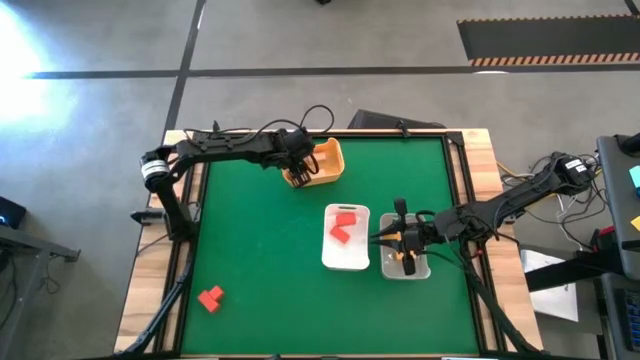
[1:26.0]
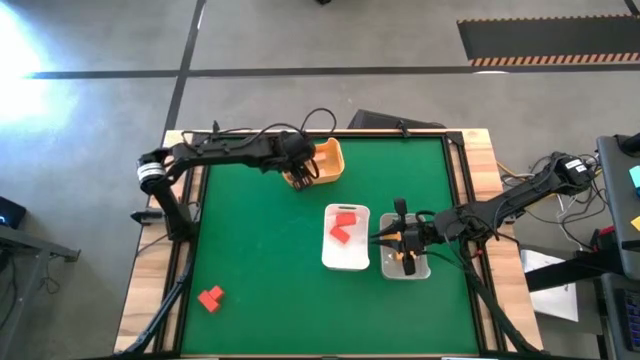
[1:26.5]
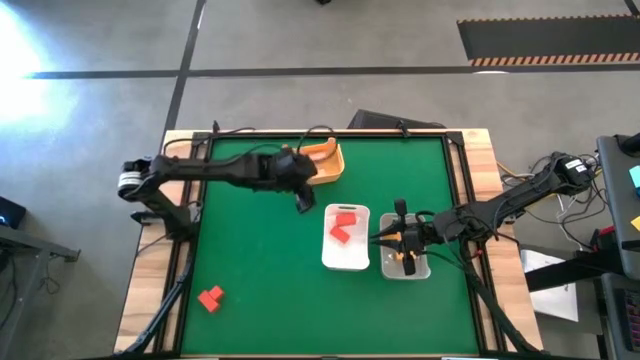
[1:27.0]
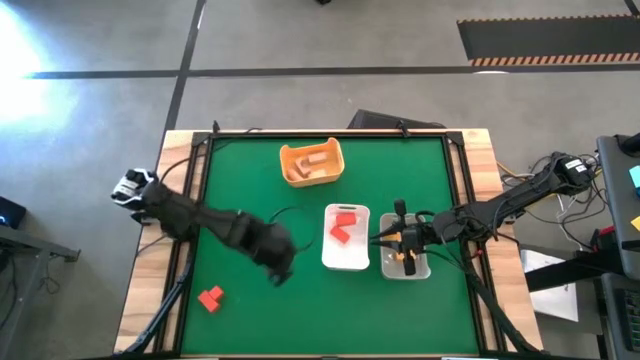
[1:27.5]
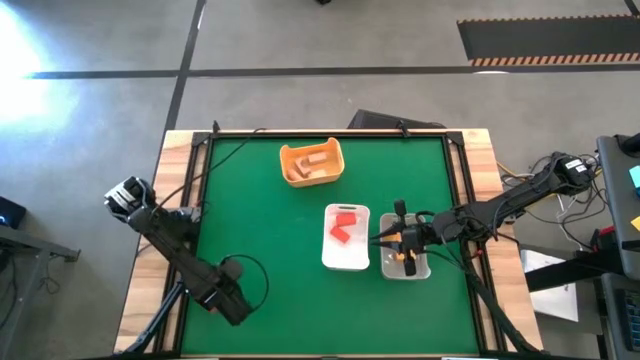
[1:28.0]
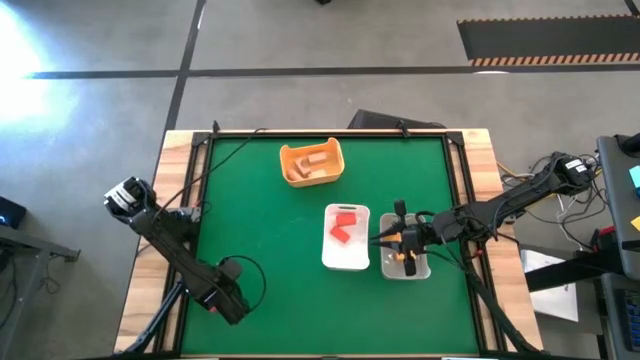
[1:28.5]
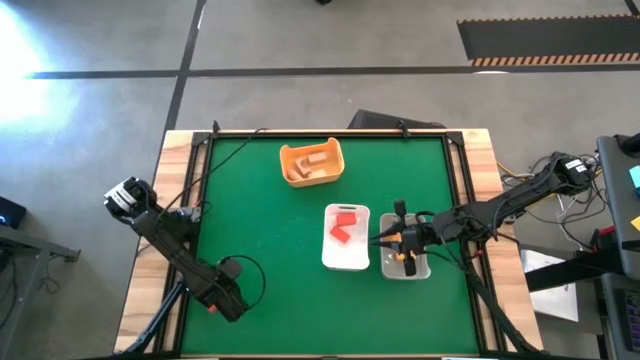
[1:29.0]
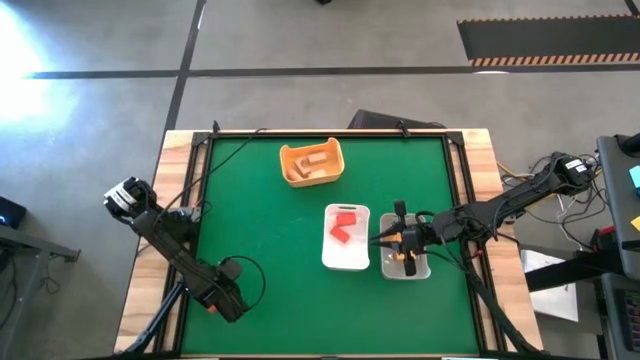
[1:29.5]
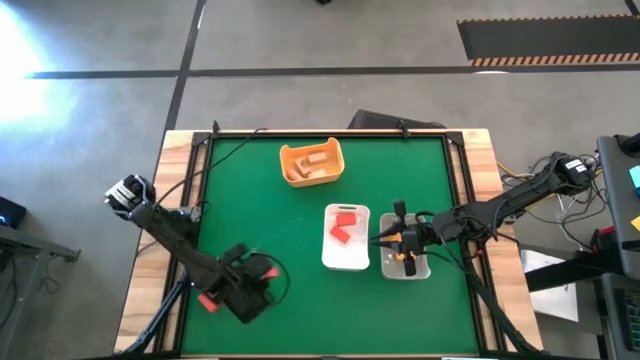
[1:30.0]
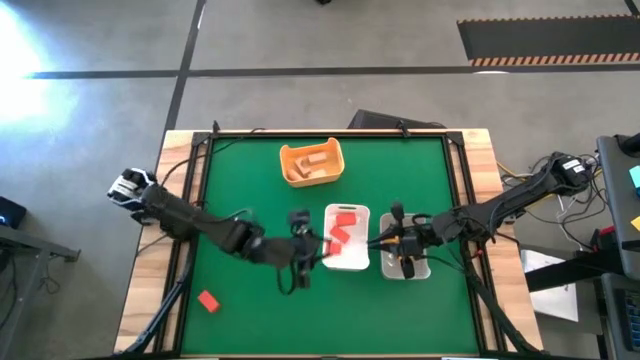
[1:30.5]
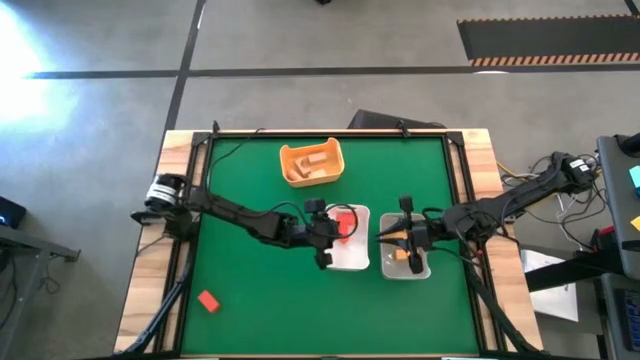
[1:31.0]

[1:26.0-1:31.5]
Task: Sort & place blocks by color
Put the red block into the white bin

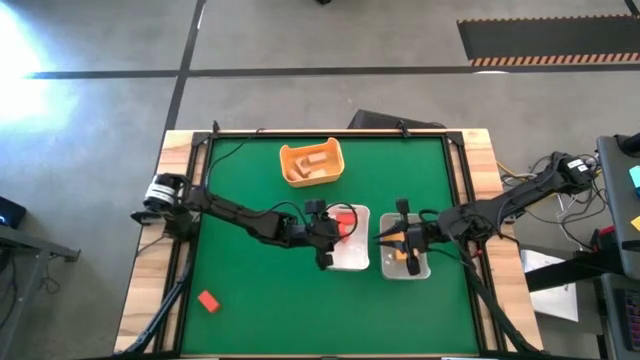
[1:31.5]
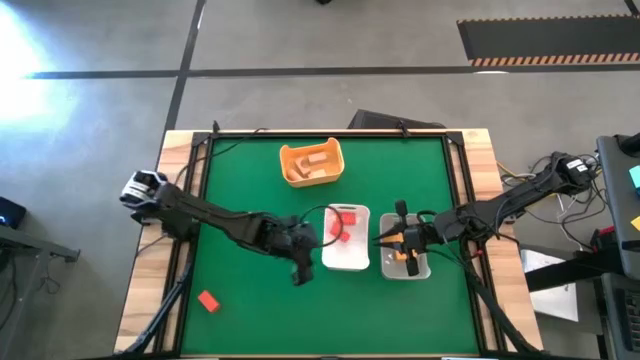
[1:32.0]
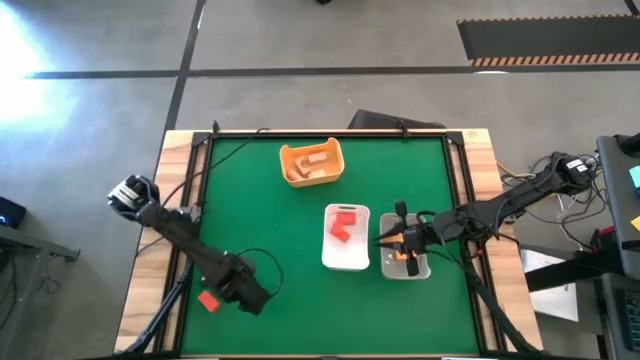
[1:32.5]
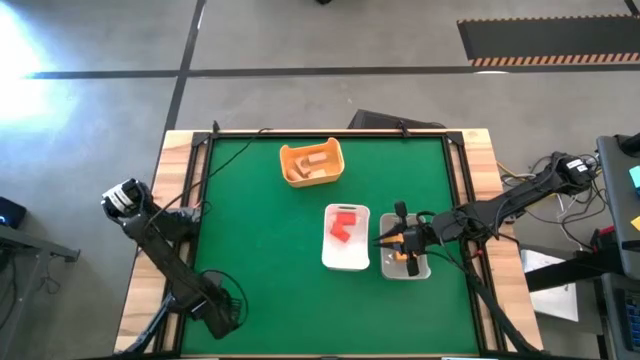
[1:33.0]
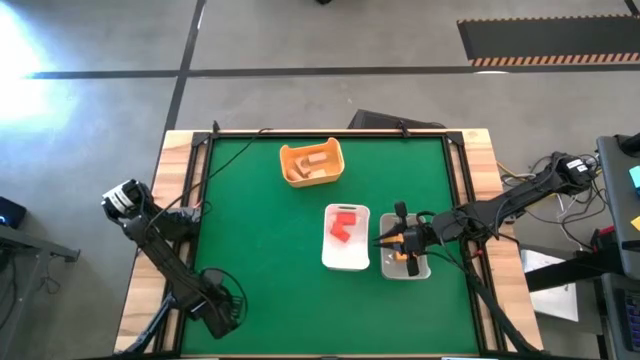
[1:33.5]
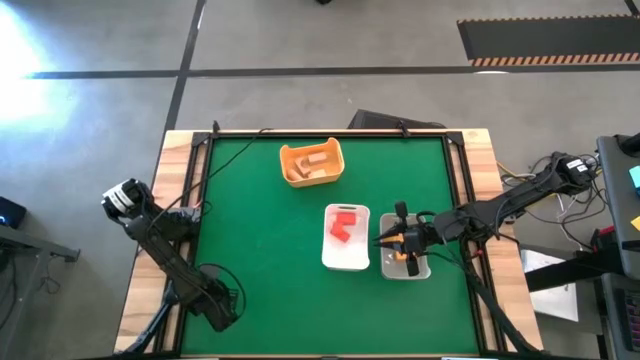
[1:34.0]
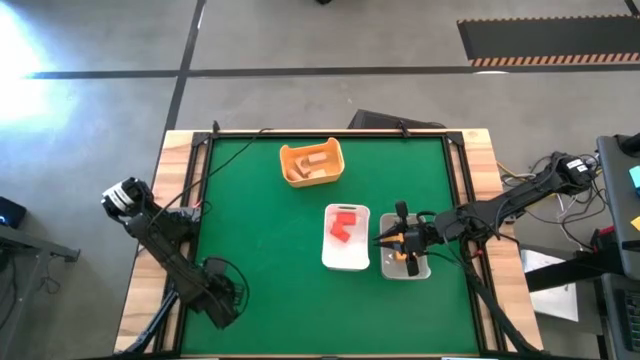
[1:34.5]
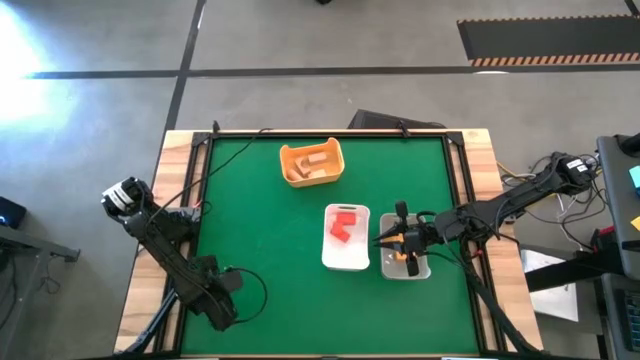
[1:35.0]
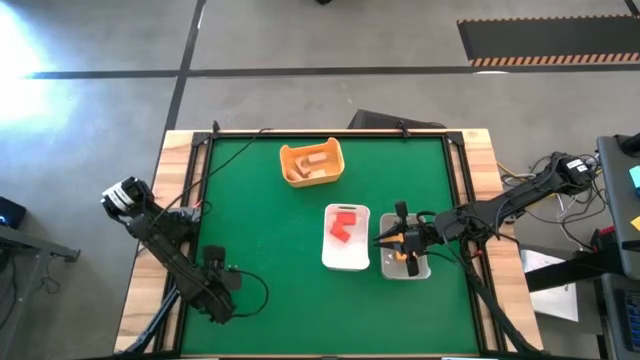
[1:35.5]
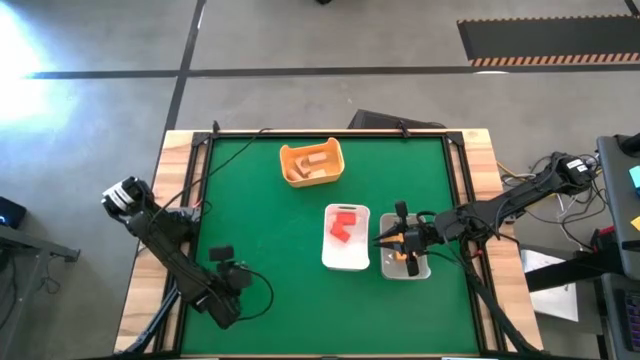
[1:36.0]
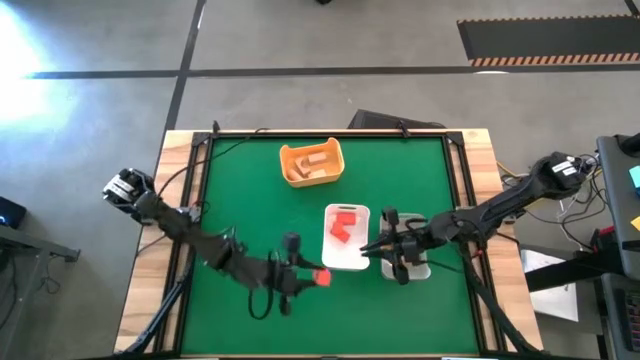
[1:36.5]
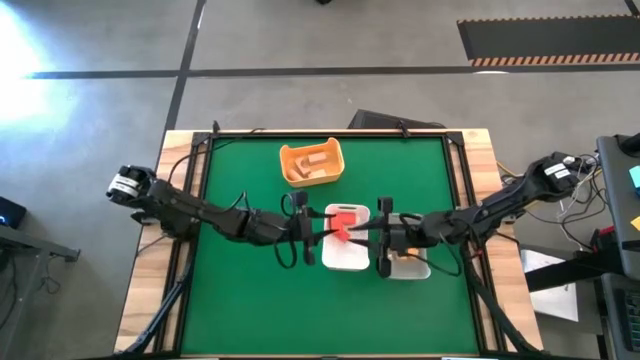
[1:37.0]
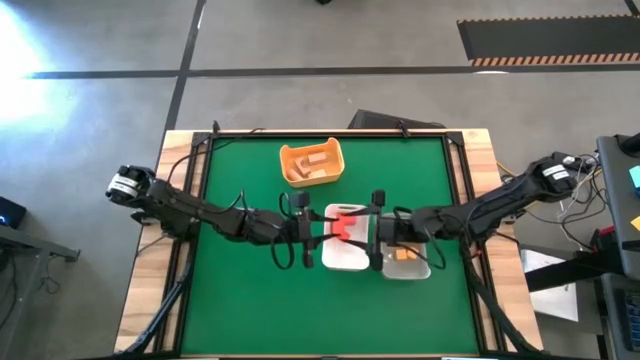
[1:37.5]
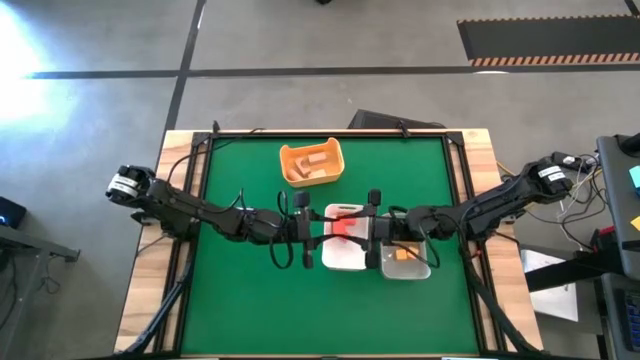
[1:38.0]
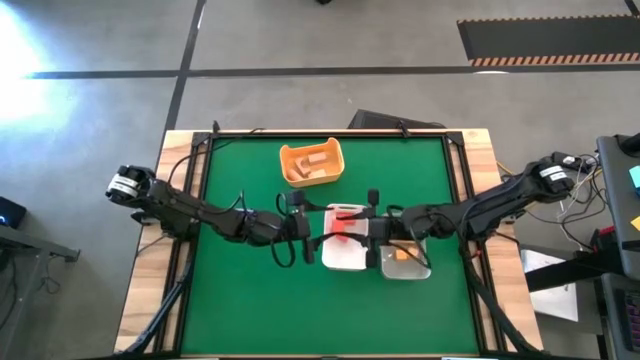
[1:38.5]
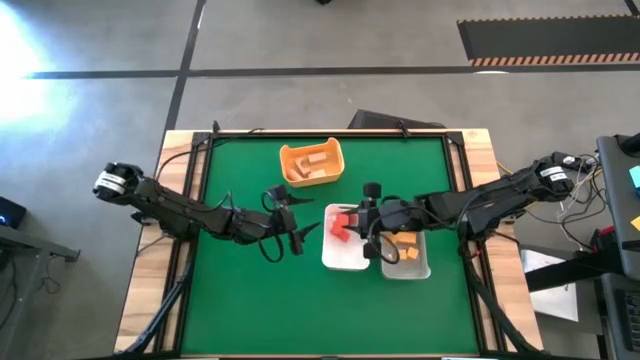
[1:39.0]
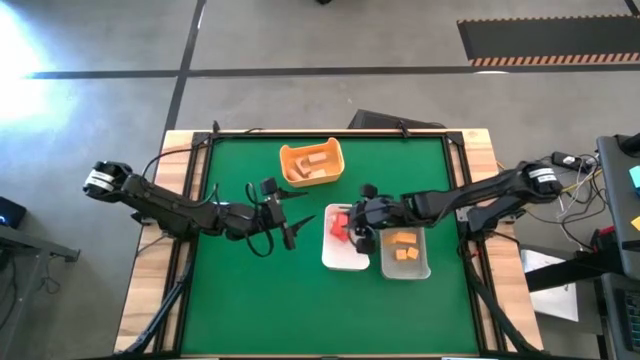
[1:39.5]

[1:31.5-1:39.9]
Put the red block into the white bin

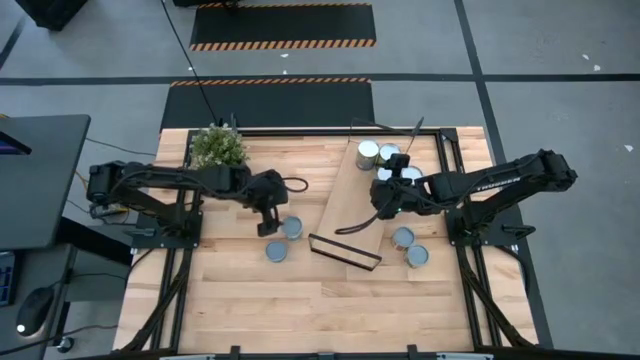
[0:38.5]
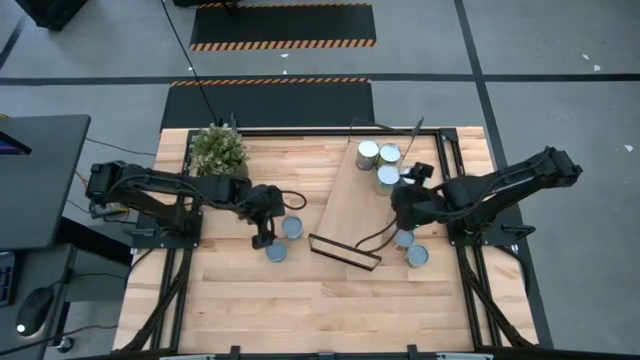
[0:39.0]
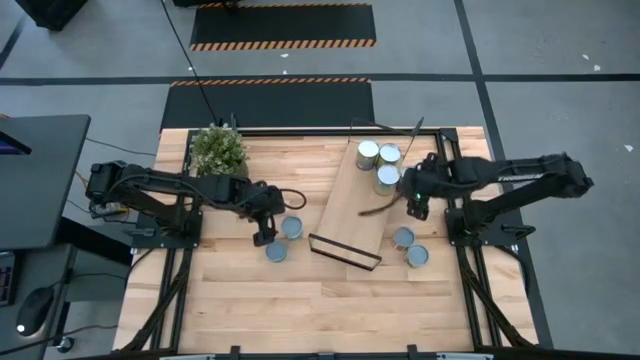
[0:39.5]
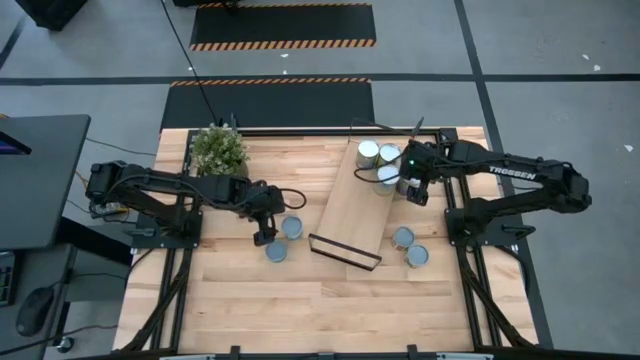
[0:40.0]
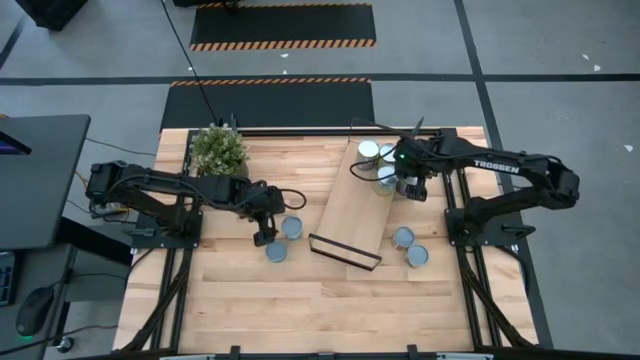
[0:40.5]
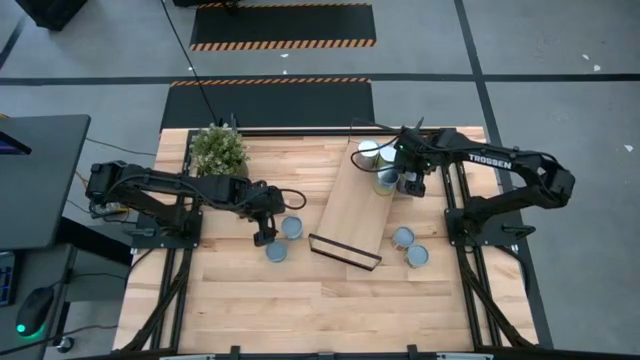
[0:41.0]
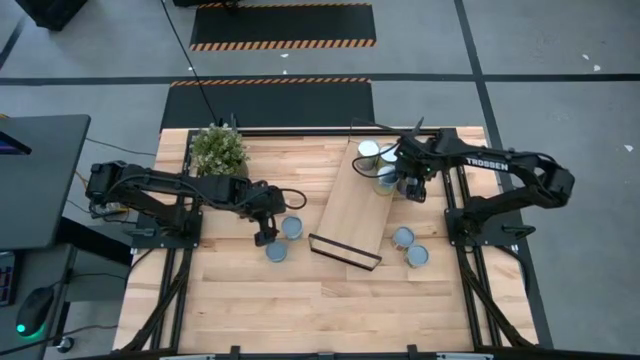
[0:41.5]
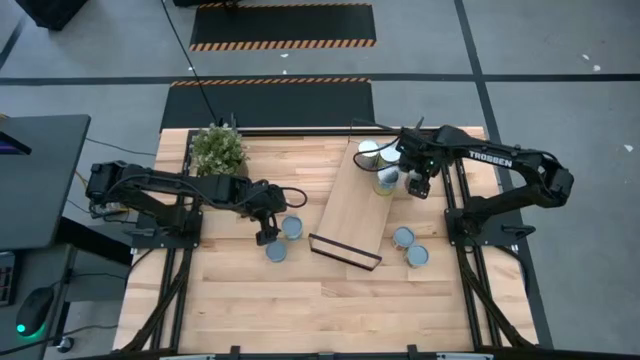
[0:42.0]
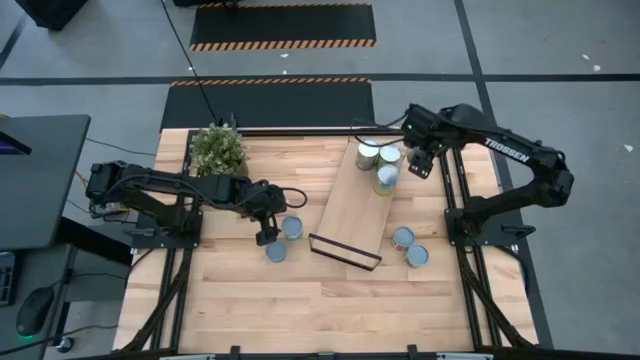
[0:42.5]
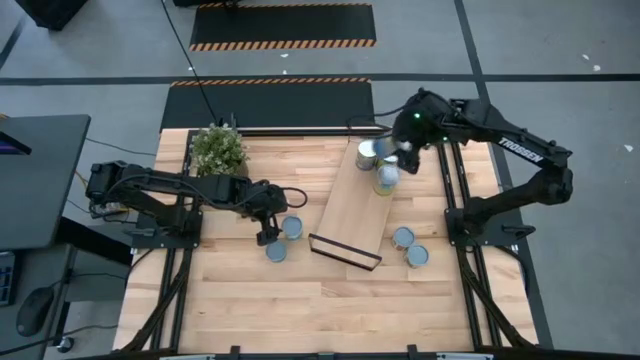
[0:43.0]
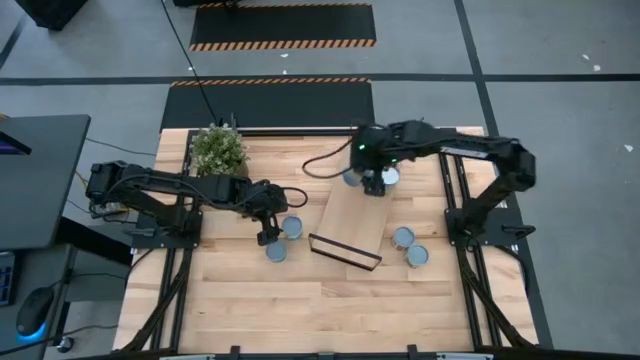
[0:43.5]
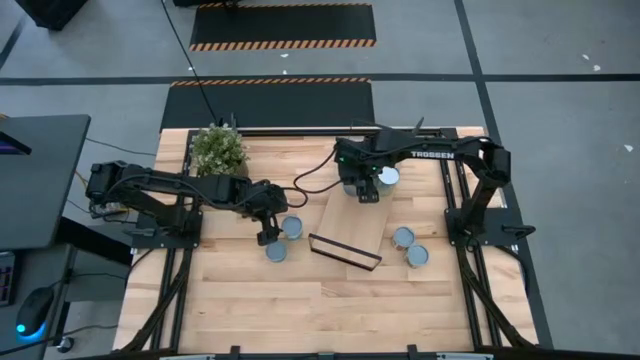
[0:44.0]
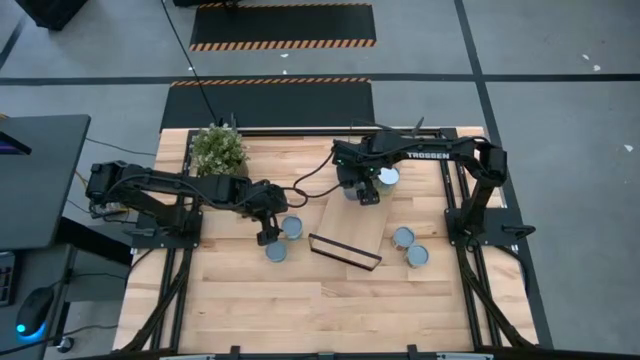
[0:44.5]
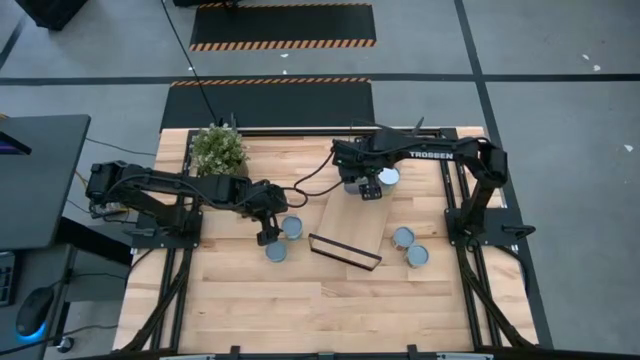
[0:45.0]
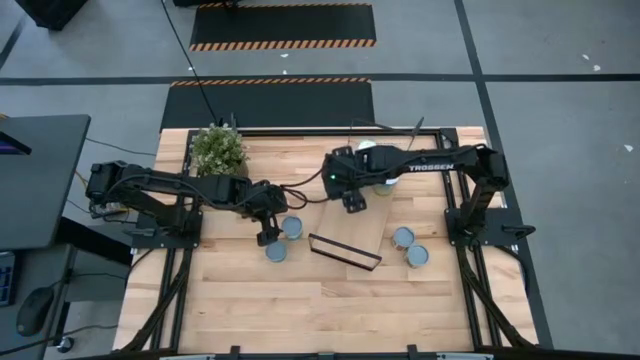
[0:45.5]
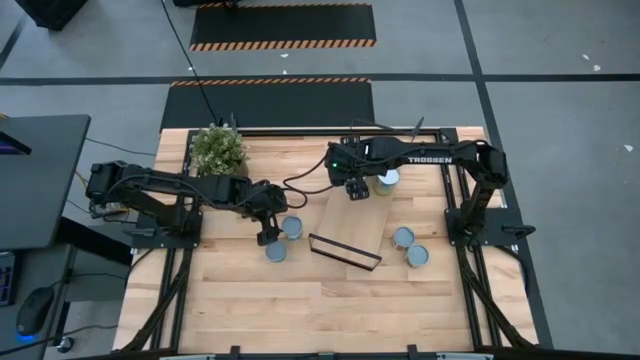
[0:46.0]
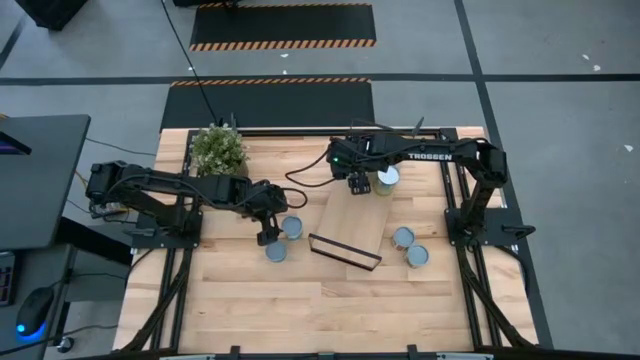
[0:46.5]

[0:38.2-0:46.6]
Task: Pick and place cans onto a shelf
Put the canned peas on the shelf

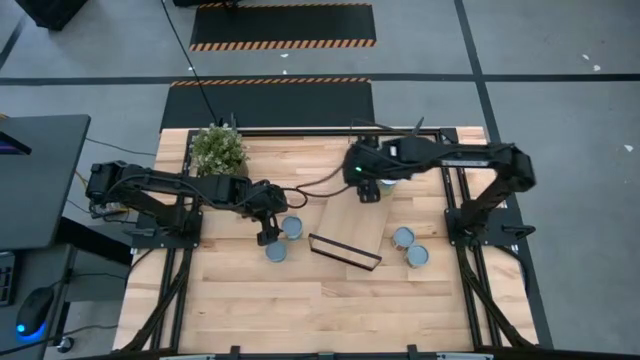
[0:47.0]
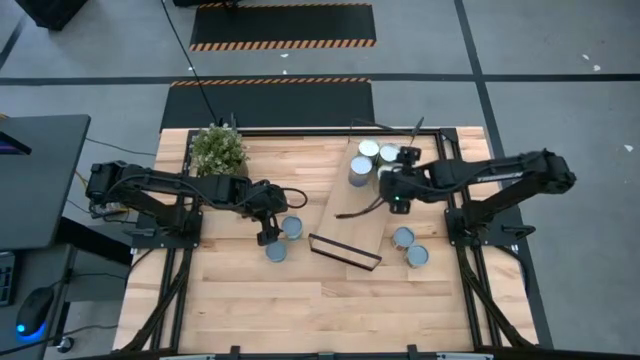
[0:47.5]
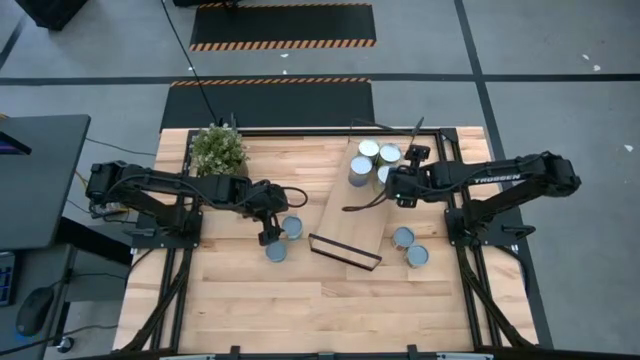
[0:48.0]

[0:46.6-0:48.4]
Adjust the canned carrots on the shelf
